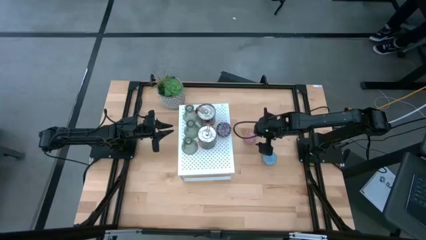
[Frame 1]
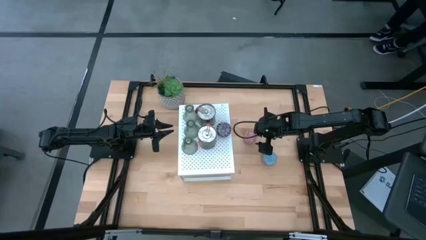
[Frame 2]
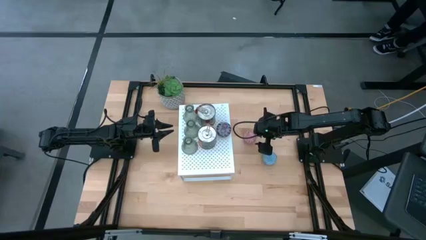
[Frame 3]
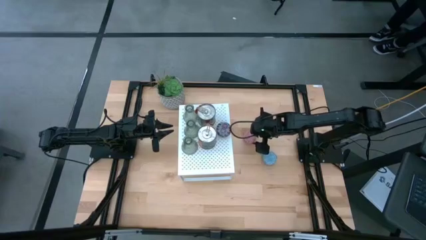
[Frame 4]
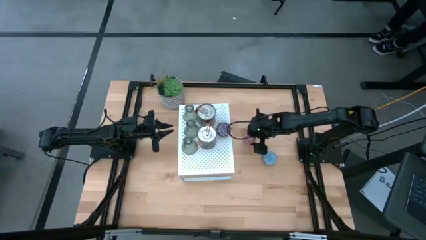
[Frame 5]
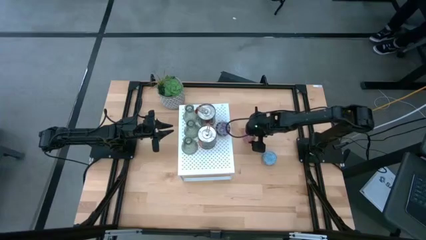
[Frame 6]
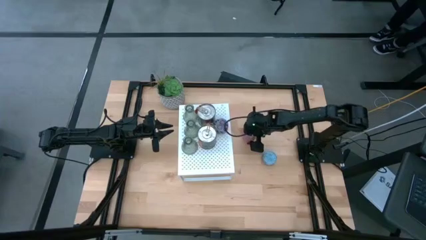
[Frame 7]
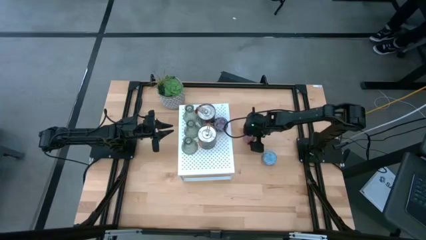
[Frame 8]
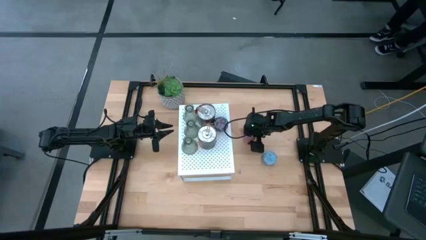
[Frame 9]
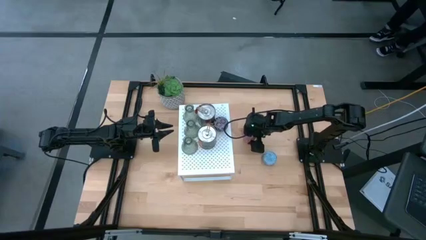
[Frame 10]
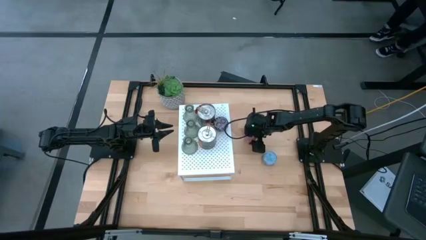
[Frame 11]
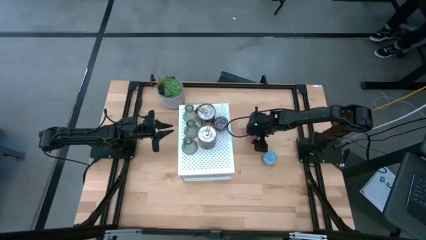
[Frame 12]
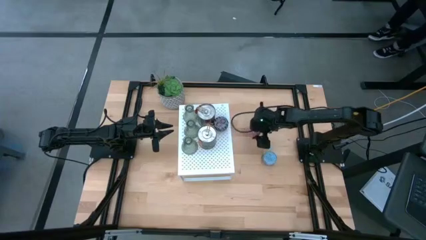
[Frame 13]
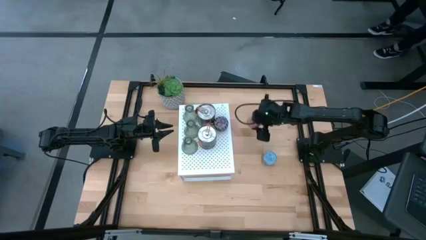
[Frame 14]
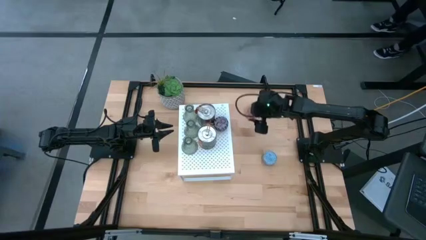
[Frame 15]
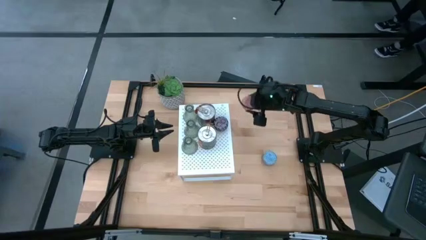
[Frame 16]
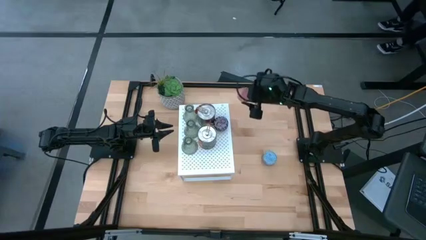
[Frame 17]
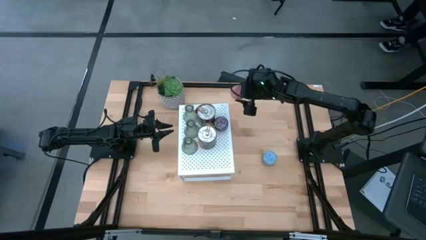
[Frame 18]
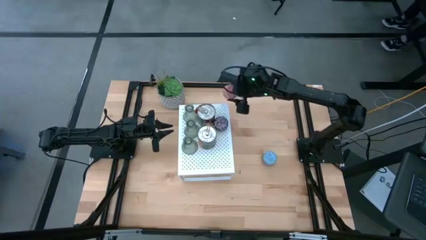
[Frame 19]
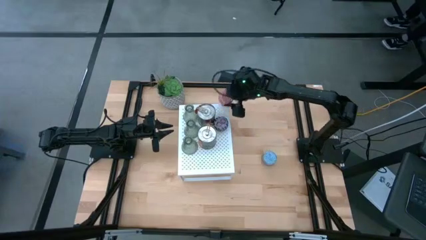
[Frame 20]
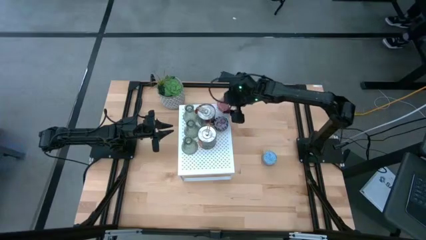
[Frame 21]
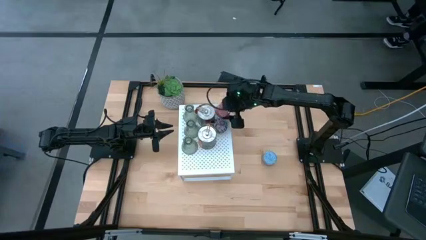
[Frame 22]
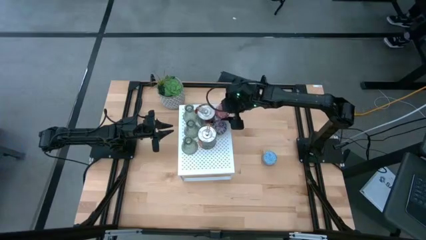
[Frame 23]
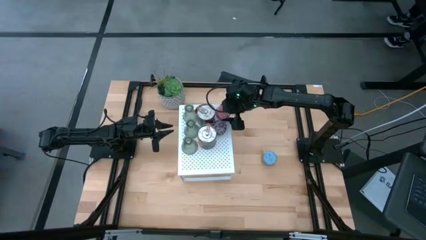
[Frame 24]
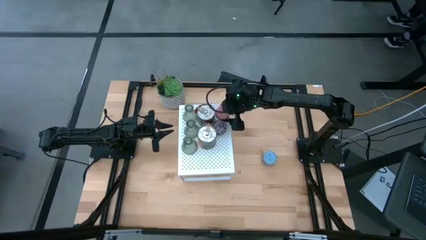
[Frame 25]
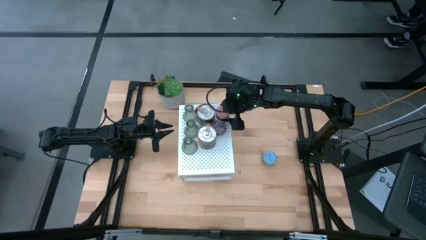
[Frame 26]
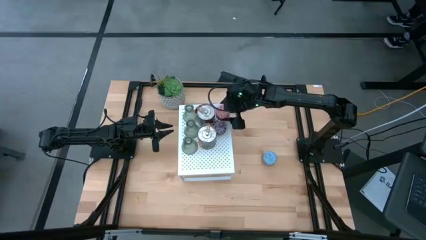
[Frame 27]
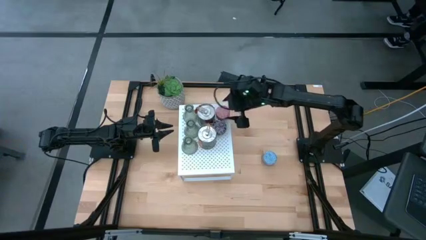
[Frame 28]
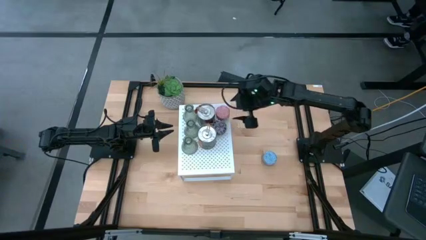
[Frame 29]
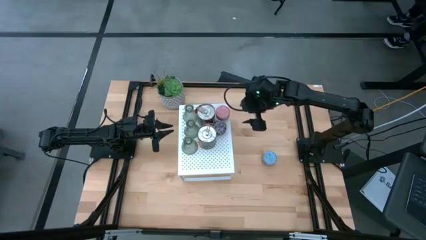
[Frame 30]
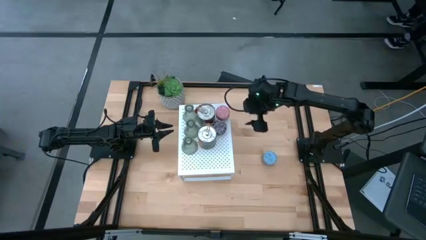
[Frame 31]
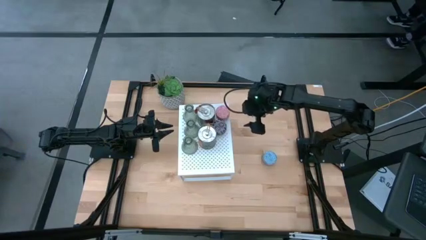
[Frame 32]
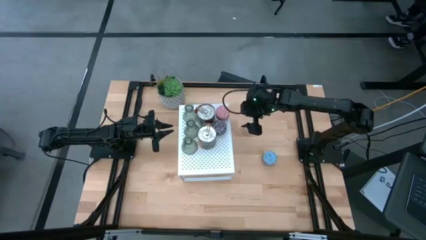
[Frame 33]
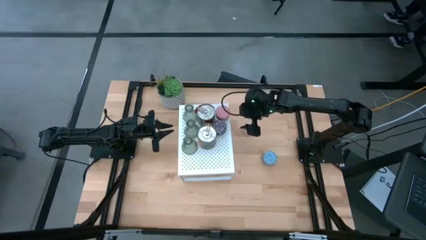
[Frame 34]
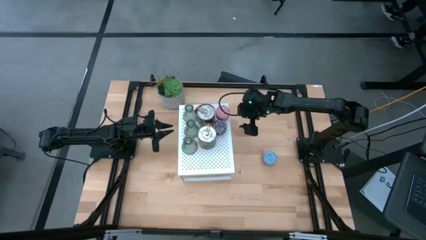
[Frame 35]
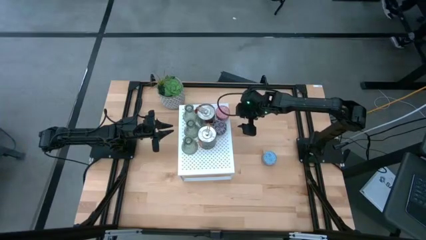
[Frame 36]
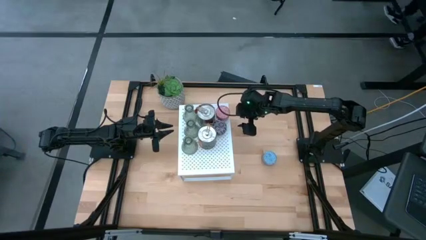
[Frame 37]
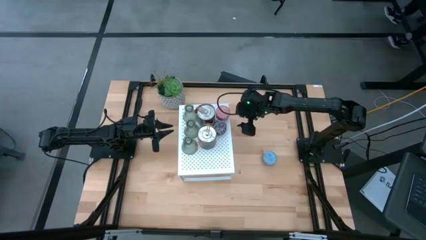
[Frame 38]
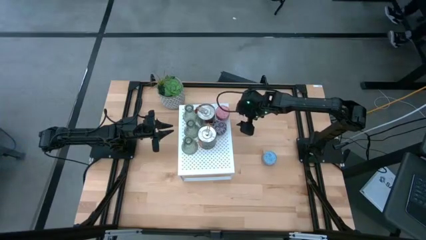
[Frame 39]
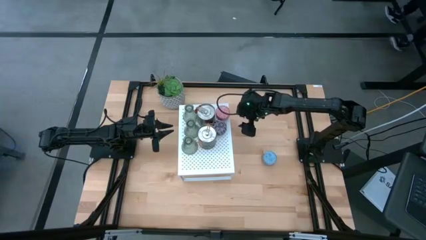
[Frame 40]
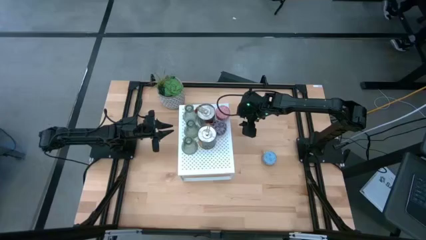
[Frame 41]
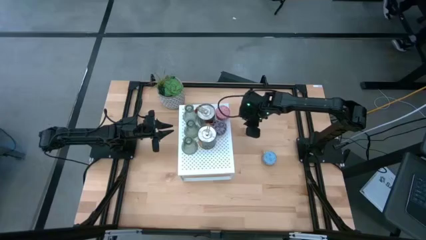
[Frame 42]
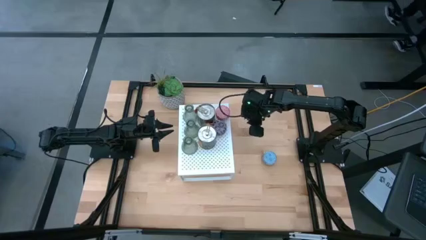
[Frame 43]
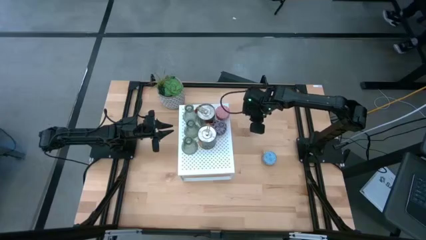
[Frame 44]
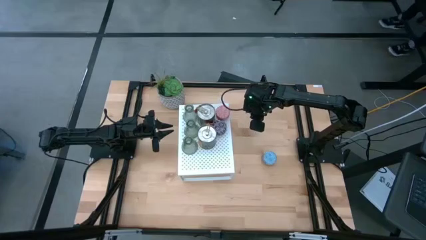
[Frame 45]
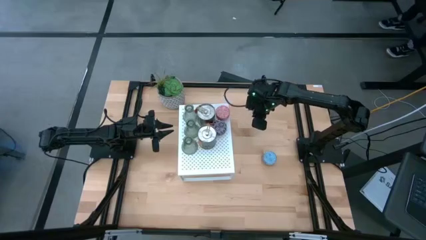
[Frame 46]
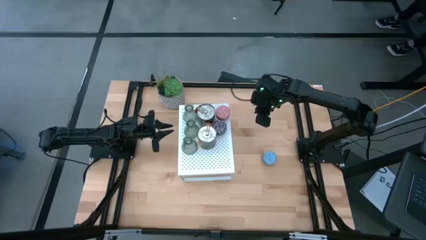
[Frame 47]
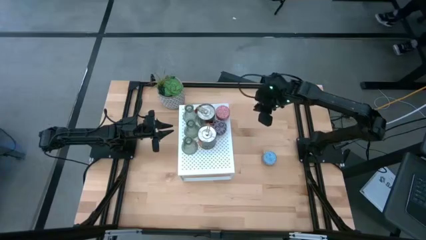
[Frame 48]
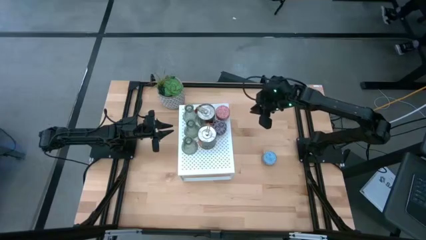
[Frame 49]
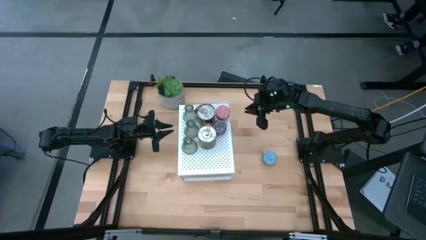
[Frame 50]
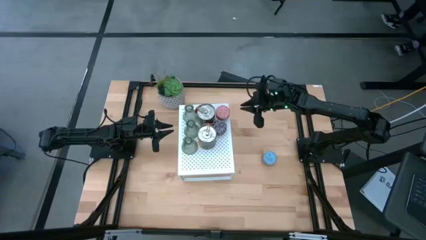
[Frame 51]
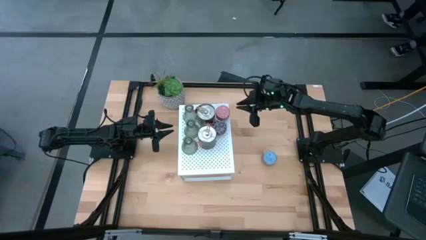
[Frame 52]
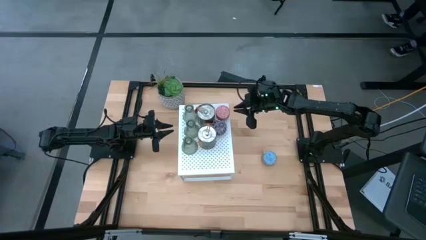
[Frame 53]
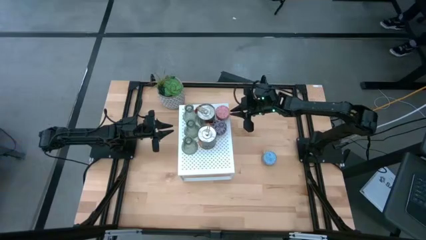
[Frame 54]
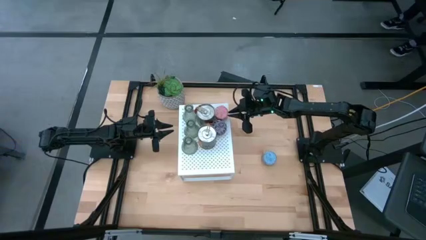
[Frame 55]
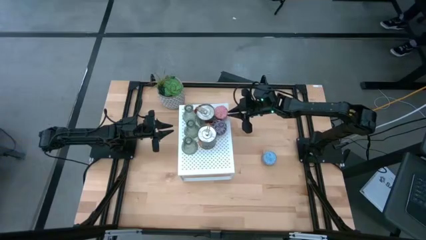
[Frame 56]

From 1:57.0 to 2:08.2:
Task: Pick & Place candle stick holders
Align the red patterned scented candle with the black patterned scented candle on the shelf

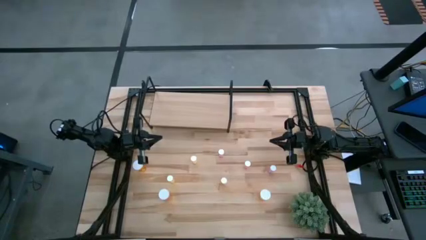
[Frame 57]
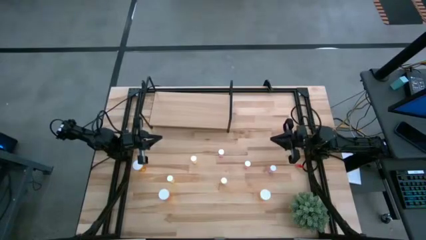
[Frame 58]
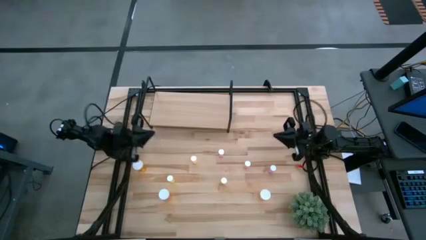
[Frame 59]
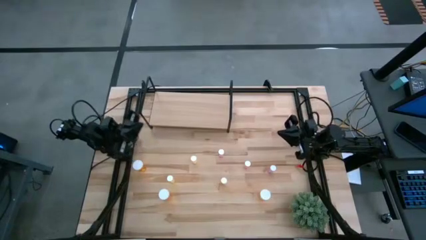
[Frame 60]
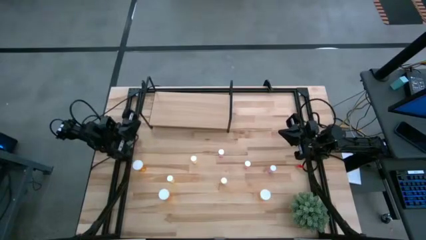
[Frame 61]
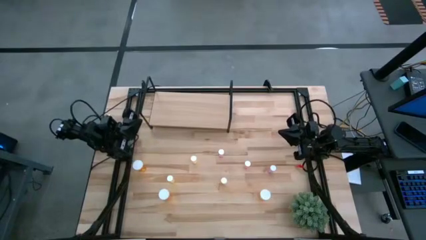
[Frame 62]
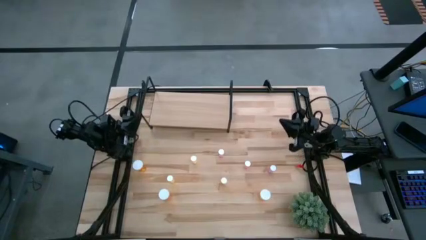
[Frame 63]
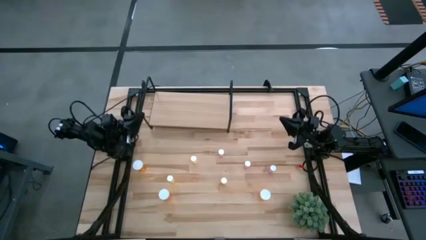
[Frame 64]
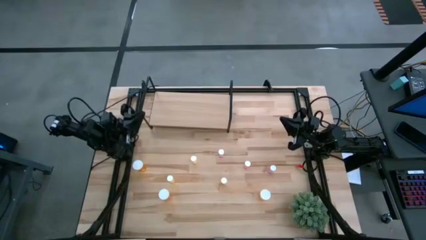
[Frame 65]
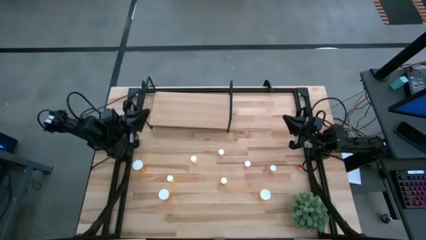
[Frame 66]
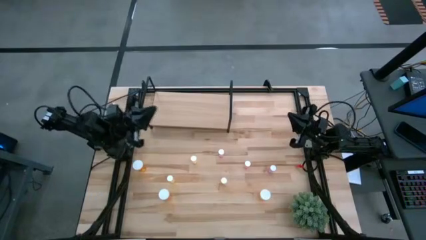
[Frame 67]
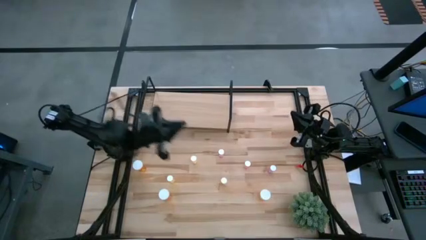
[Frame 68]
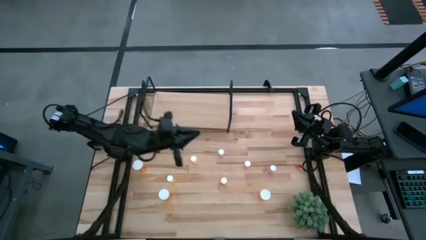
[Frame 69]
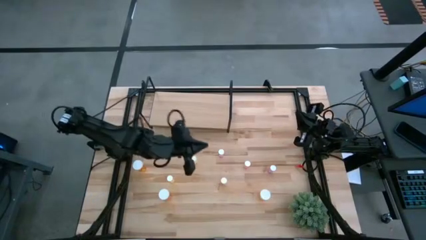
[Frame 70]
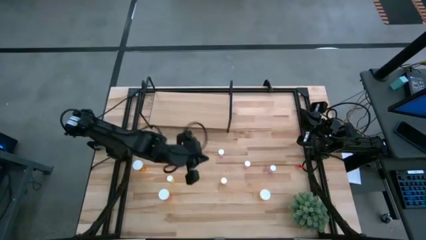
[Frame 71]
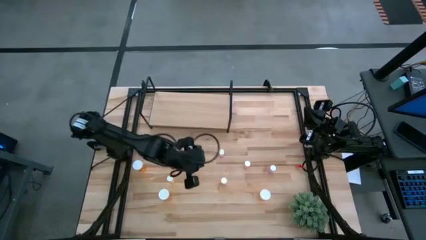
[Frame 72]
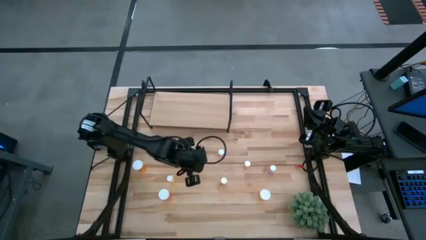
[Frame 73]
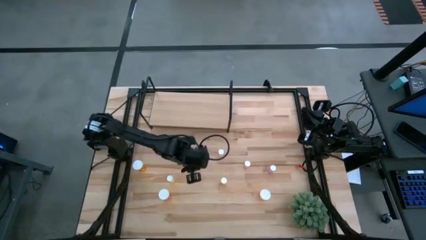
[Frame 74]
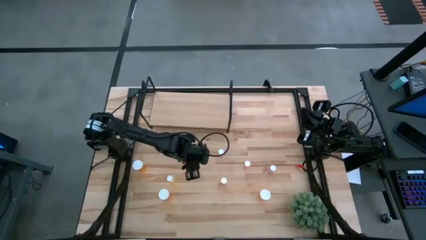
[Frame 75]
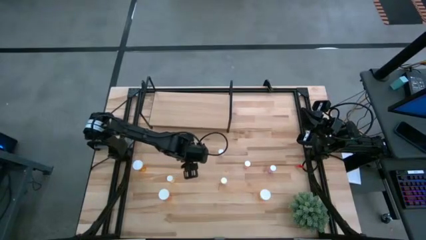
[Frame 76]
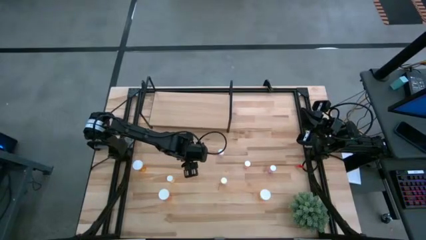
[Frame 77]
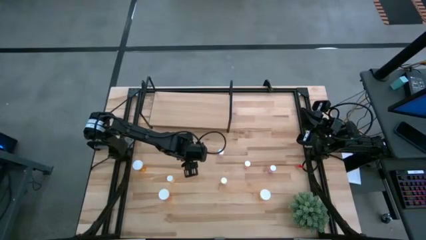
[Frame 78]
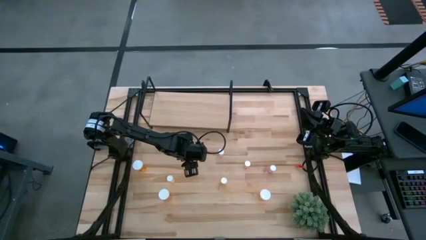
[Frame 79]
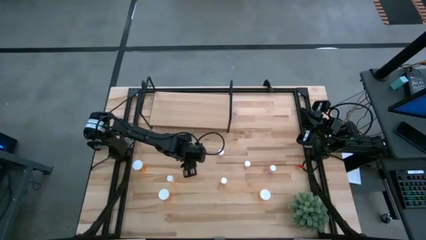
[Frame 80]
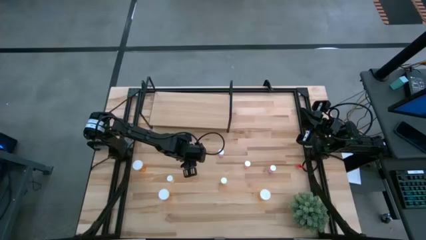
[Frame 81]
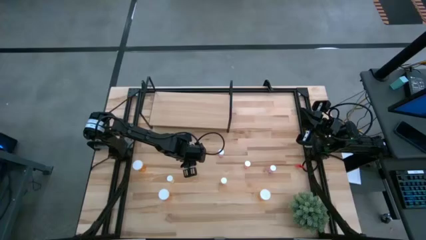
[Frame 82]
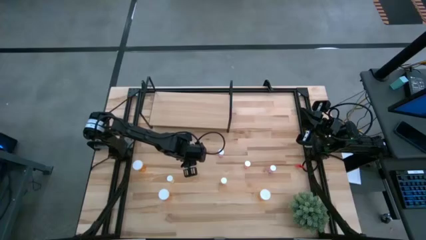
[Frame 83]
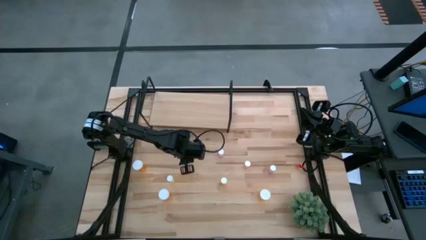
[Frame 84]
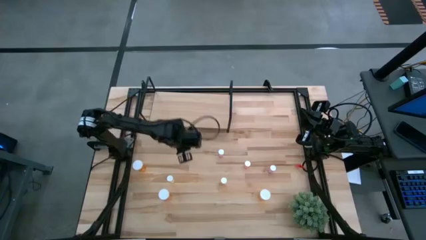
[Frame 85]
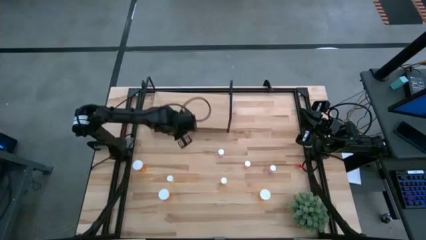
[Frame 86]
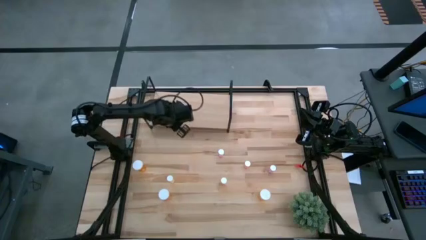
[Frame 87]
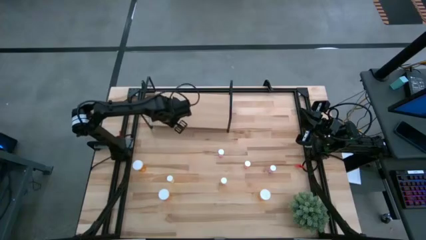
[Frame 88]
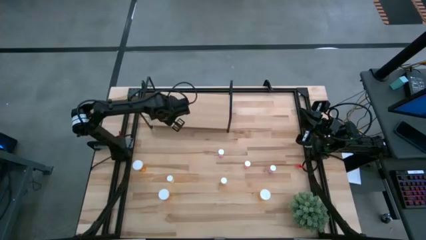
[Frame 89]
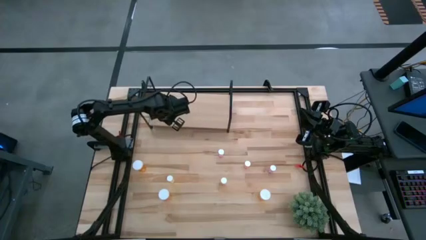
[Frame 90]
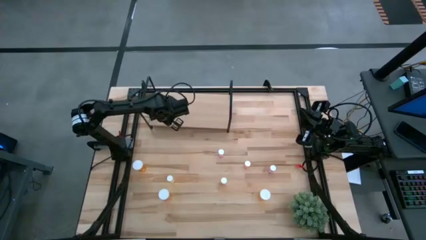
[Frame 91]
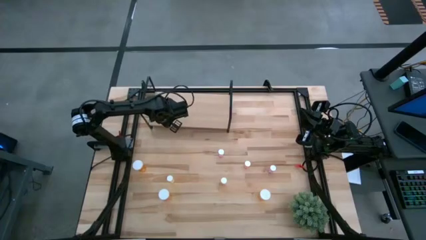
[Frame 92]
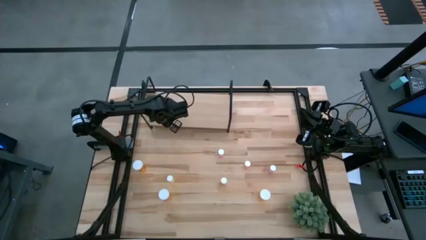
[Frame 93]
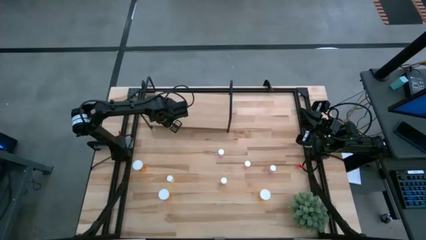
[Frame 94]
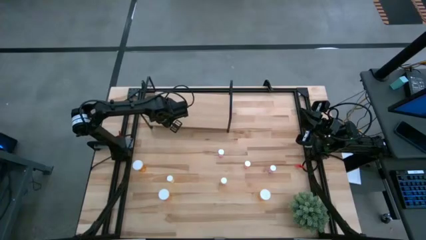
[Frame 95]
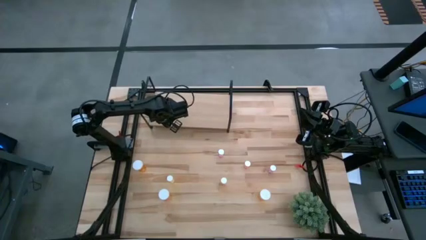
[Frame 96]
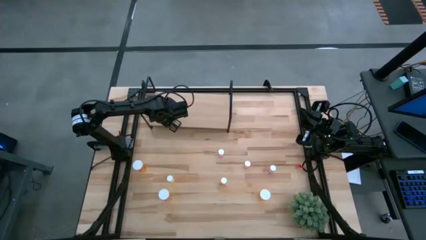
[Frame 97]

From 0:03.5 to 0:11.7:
Task: Pick and place medicine bottles onto shelf by color
Put the top yellow pill bottle on the shelf
